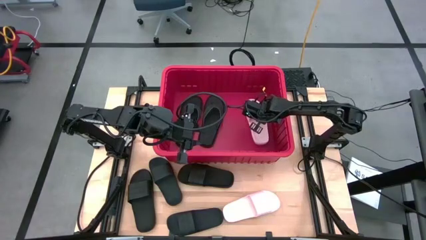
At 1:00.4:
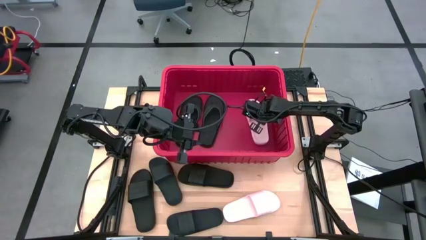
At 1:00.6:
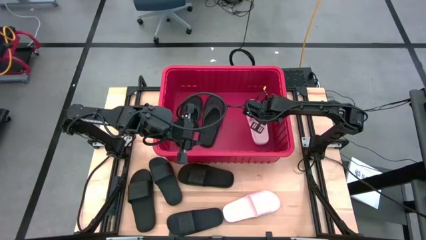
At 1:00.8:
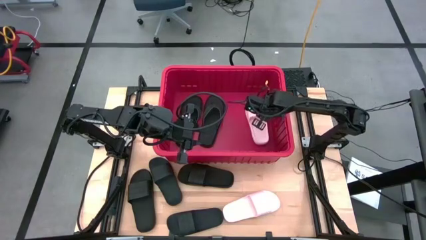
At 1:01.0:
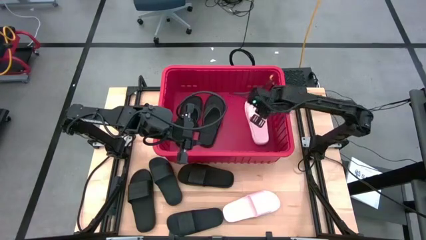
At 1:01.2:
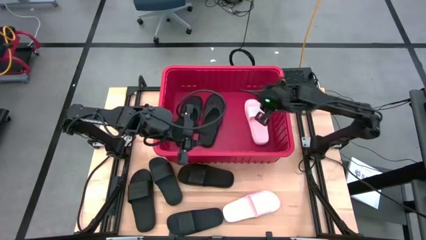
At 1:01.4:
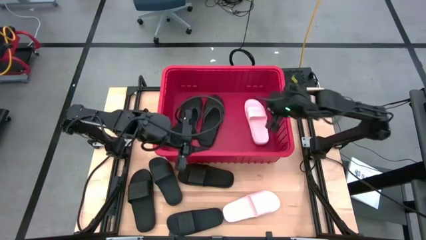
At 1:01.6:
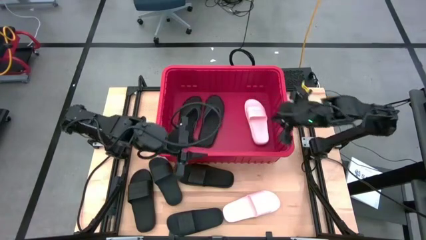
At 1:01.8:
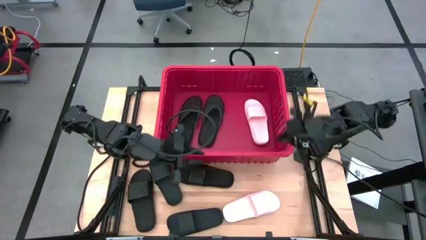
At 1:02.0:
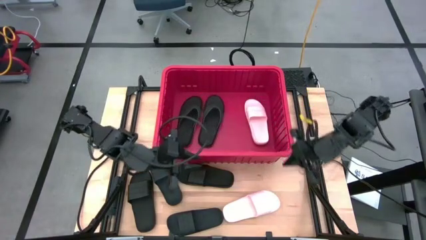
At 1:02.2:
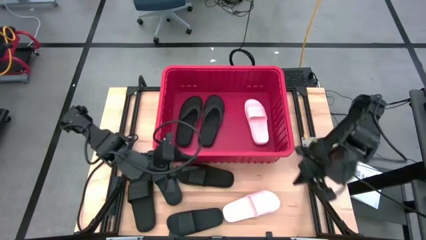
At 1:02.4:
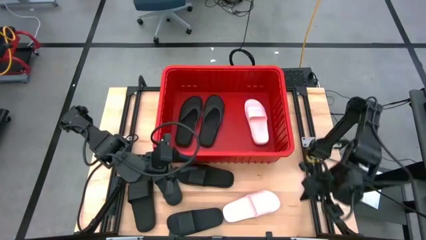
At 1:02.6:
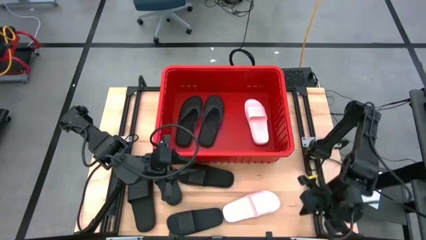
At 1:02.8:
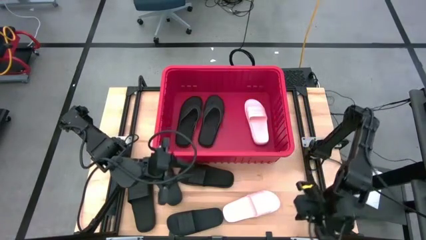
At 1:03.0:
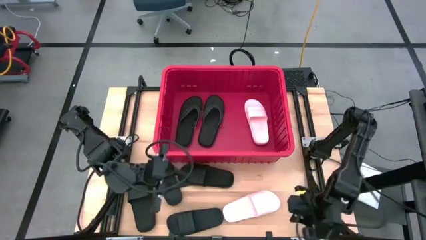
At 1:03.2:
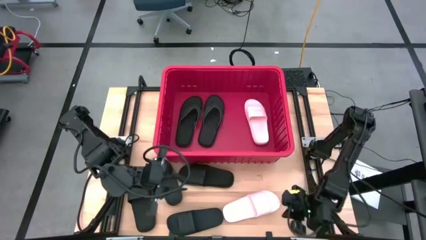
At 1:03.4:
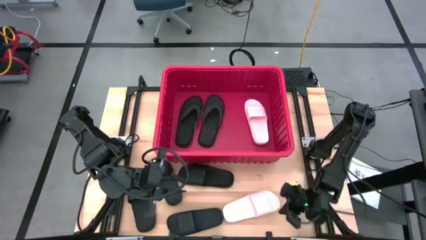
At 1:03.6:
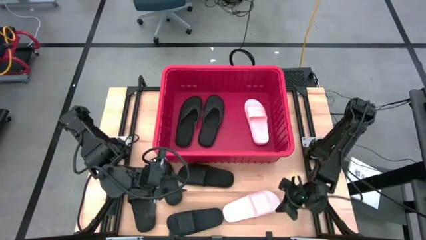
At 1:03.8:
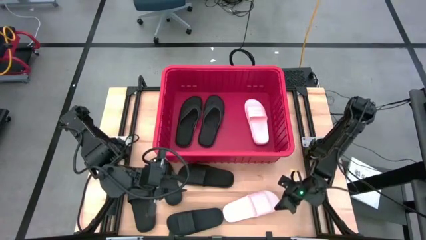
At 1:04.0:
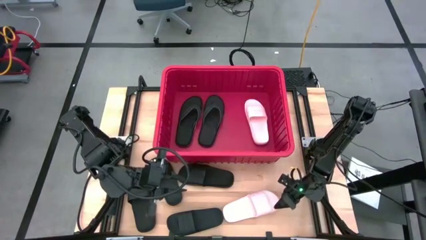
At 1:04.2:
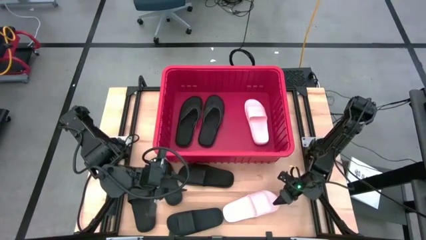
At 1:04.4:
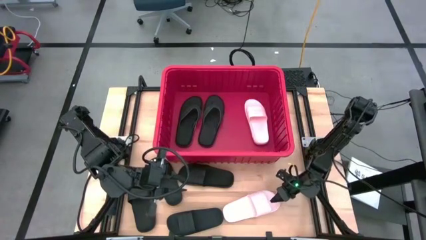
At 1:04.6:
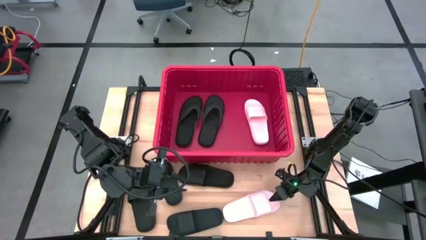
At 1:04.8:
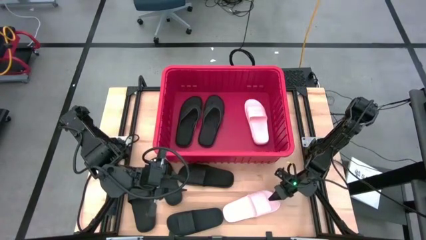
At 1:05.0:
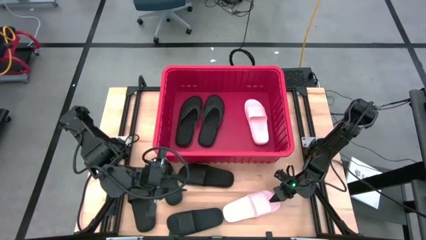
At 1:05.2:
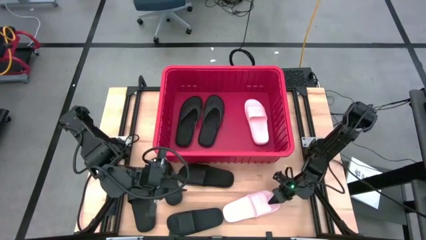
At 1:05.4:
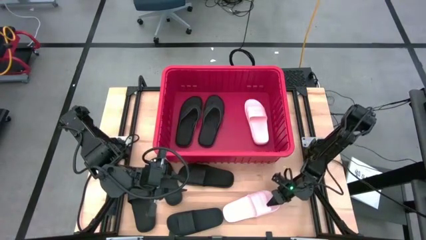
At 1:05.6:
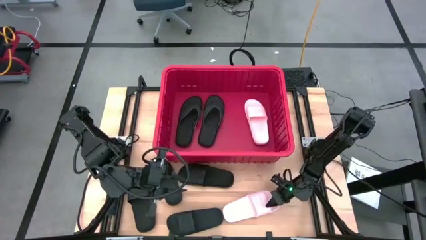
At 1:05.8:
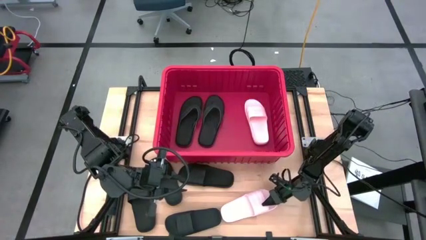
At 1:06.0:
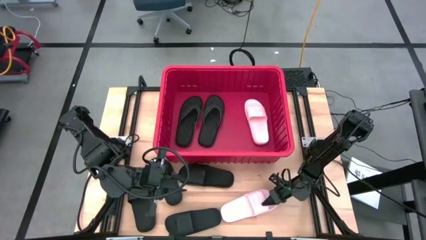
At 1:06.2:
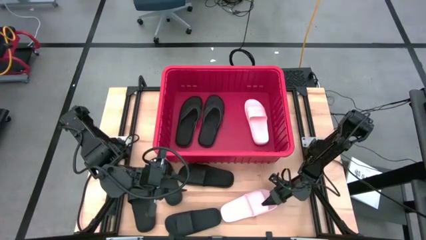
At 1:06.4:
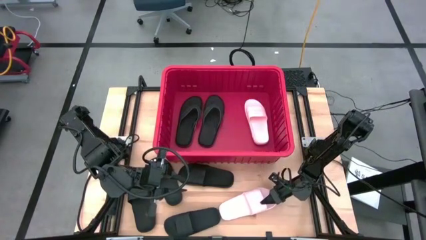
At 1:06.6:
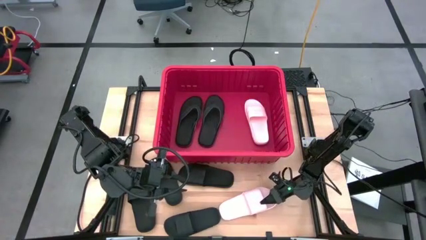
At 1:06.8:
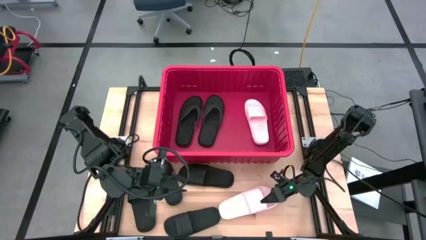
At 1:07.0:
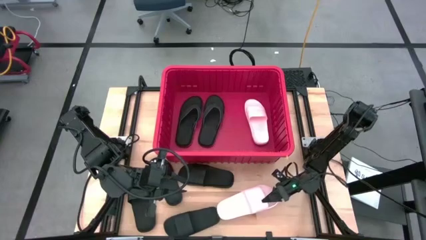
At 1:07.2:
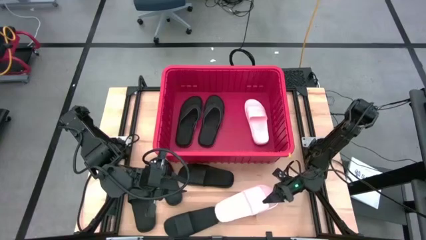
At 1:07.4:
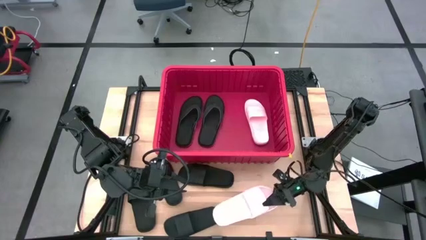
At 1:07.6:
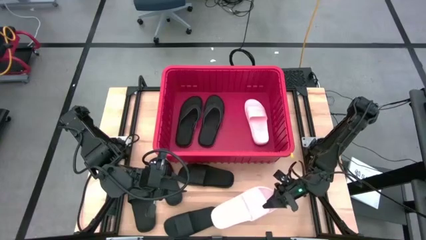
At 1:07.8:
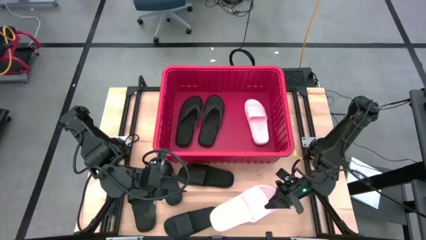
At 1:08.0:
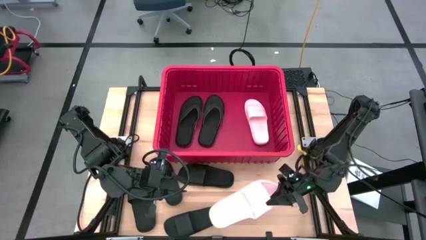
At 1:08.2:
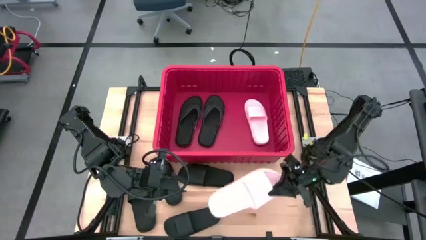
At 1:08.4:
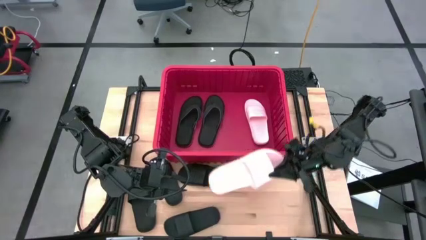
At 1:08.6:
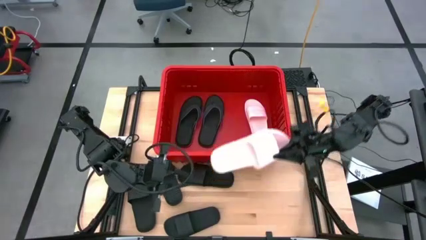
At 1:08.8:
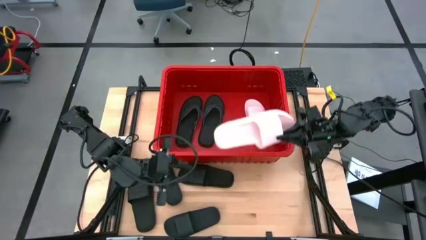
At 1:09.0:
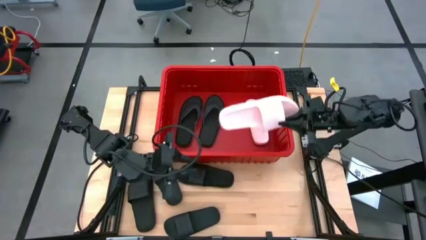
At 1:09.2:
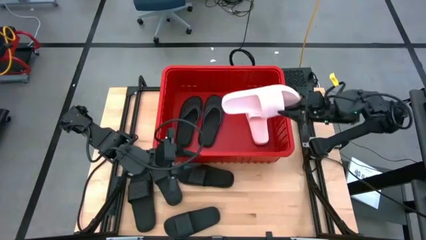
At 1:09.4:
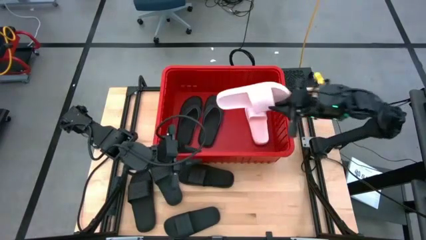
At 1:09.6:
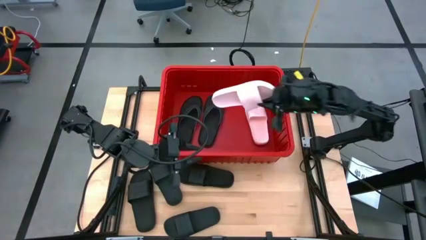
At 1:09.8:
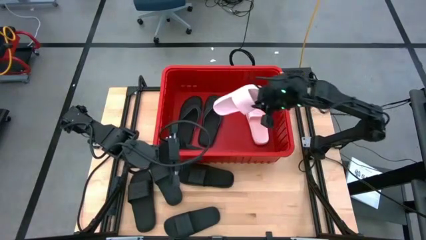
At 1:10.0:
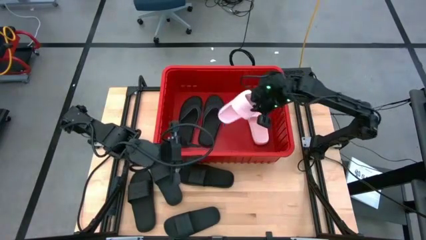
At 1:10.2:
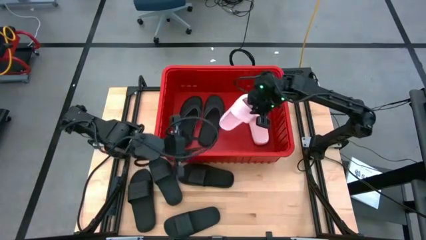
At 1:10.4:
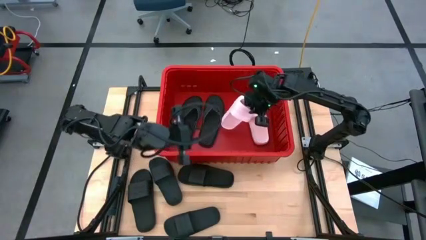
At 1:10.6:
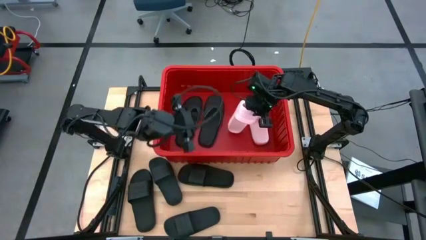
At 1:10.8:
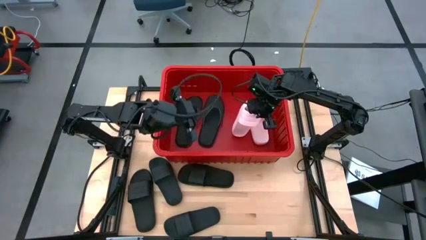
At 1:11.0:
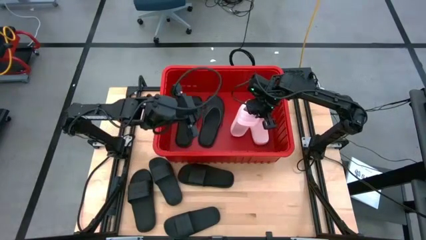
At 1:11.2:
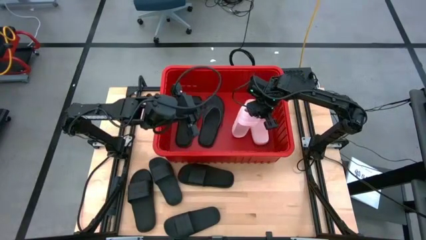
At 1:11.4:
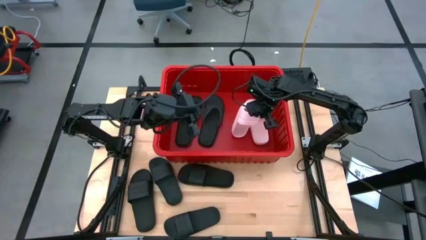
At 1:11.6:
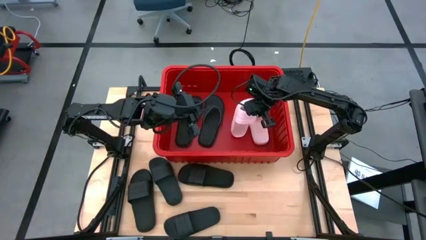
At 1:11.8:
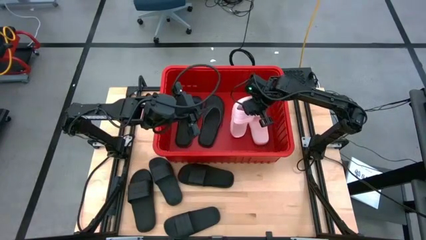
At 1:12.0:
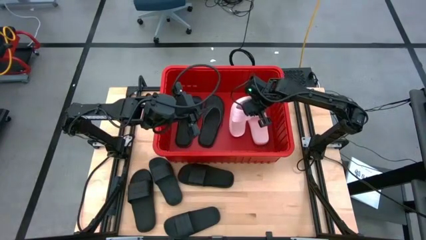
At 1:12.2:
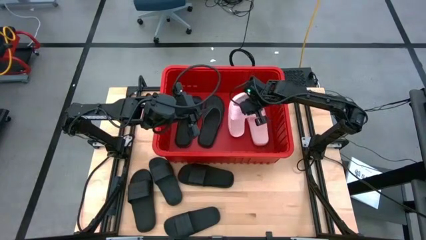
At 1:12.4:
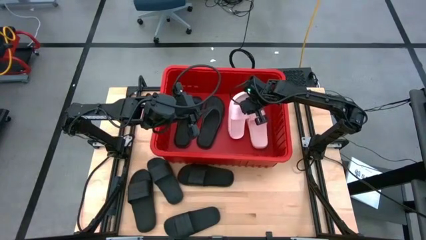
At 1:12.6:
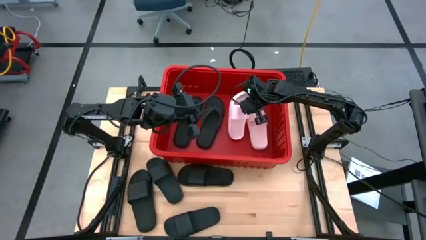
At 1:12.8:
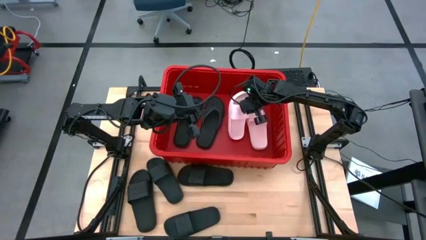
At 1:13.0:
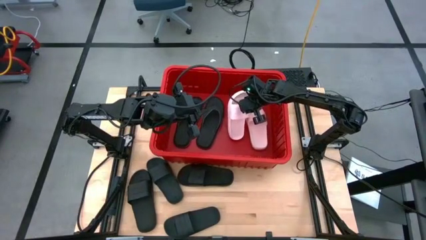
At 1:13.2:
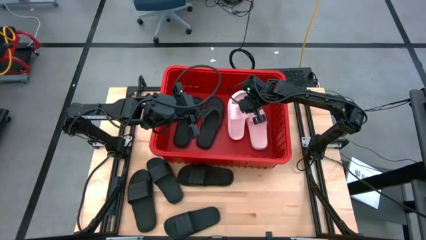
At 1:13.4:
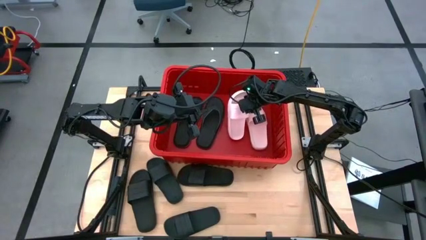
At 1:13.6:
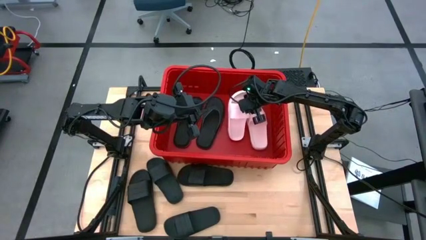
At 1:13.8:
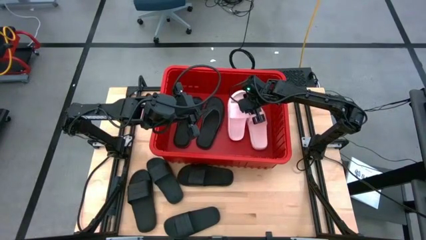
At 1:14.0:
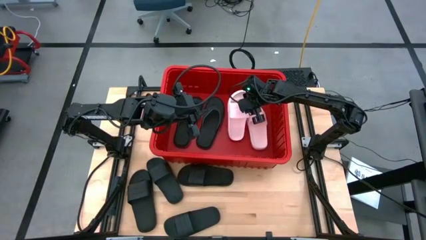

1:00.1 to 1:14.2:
Task: Pick and place slides into bin
Put the pink slide into the red bin
